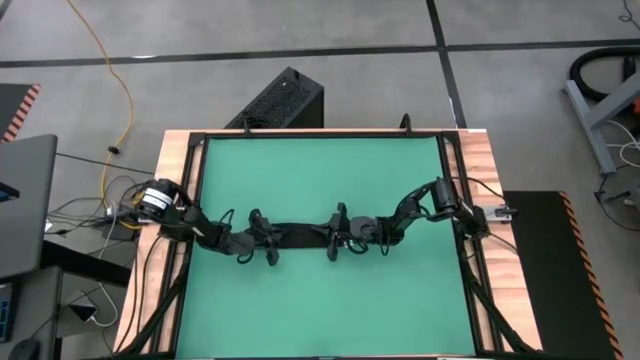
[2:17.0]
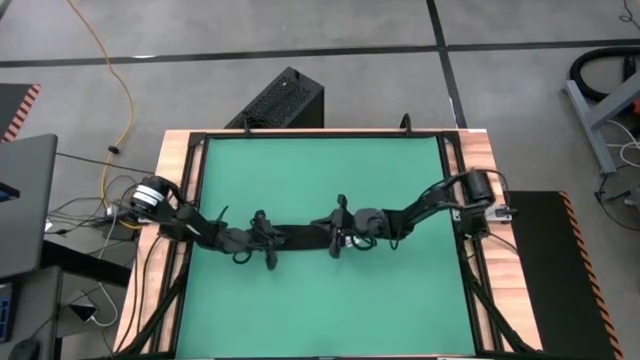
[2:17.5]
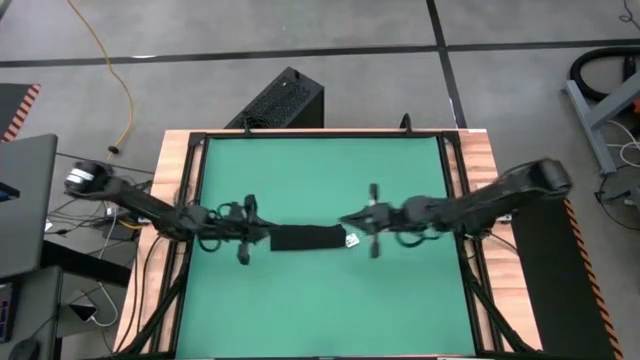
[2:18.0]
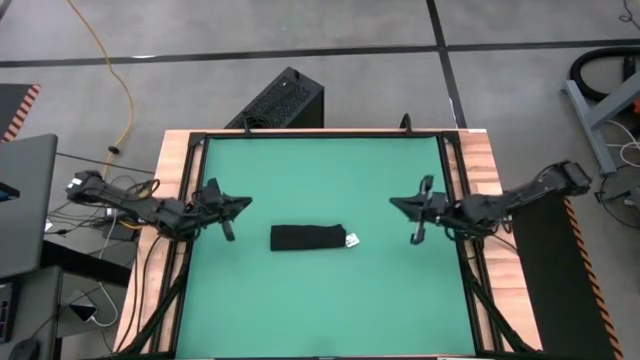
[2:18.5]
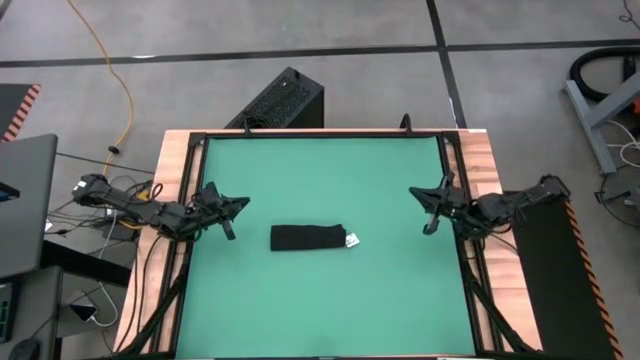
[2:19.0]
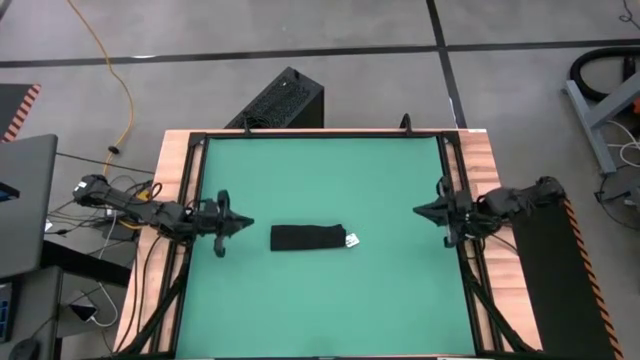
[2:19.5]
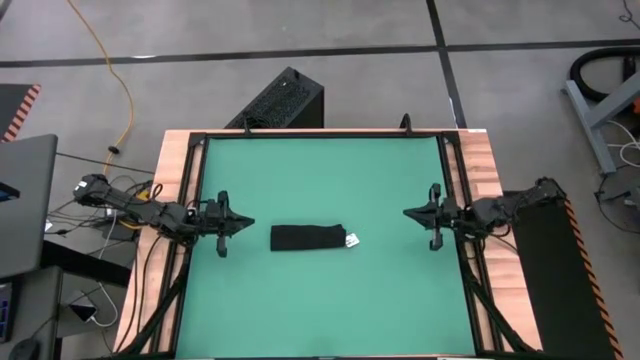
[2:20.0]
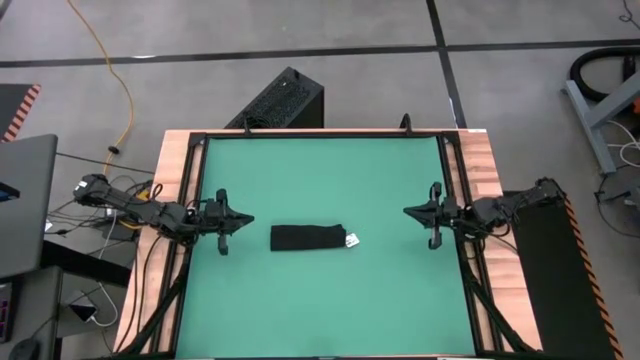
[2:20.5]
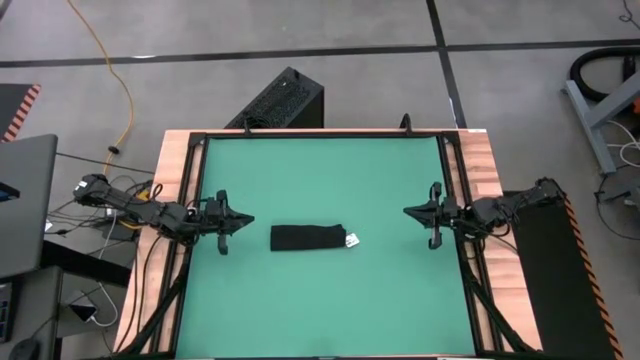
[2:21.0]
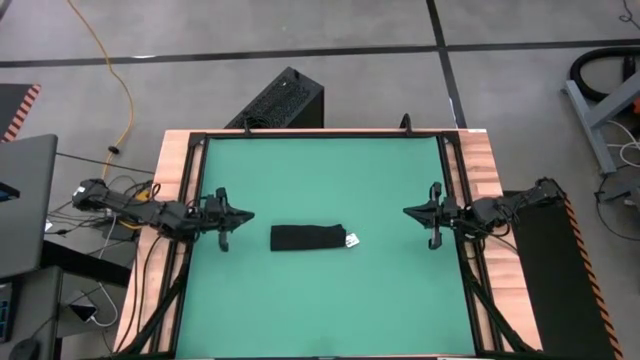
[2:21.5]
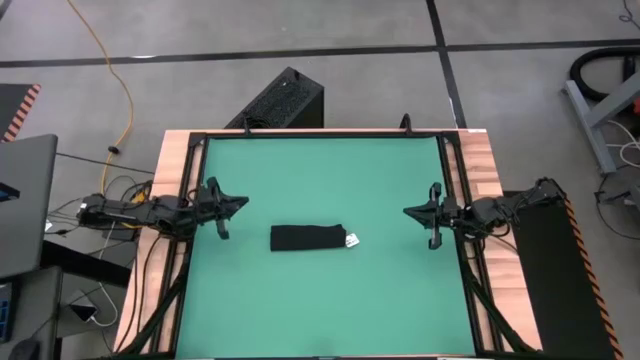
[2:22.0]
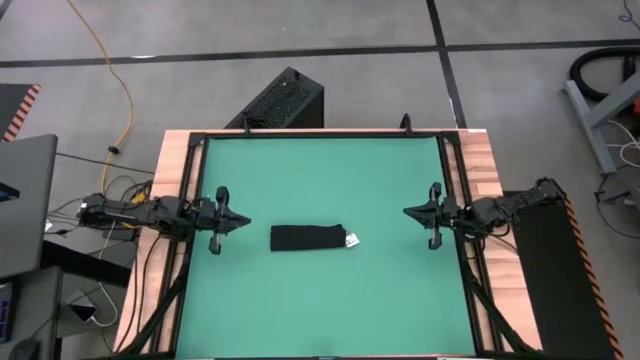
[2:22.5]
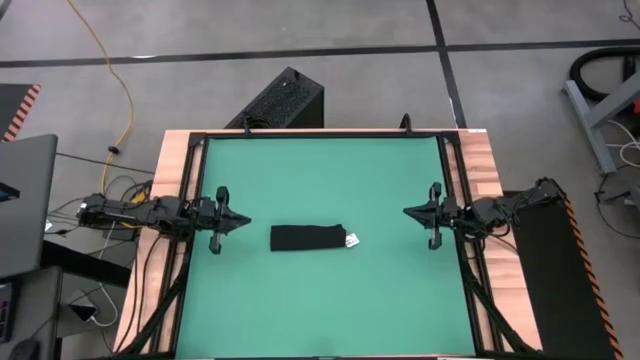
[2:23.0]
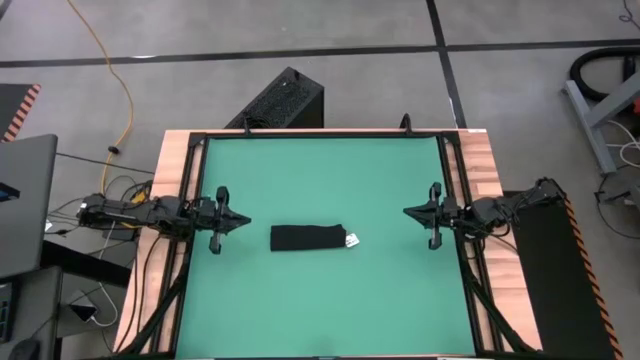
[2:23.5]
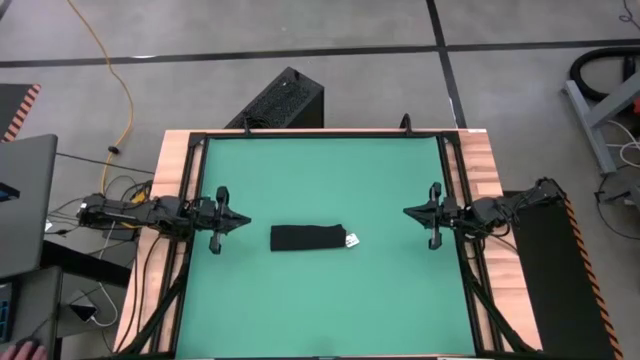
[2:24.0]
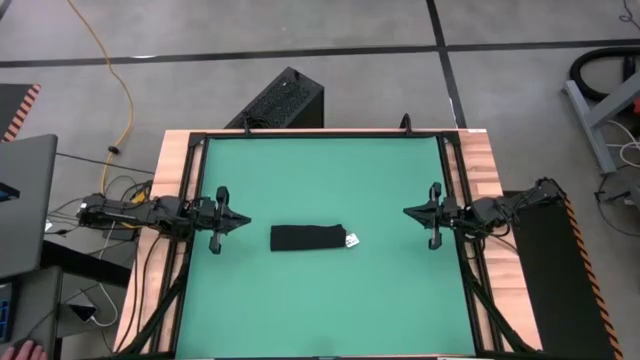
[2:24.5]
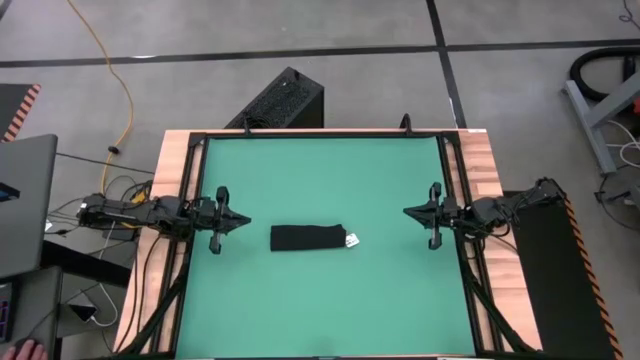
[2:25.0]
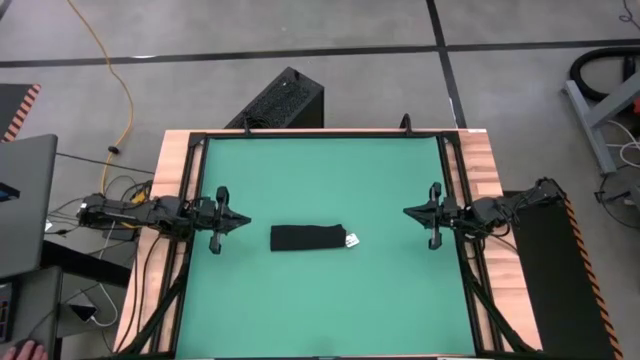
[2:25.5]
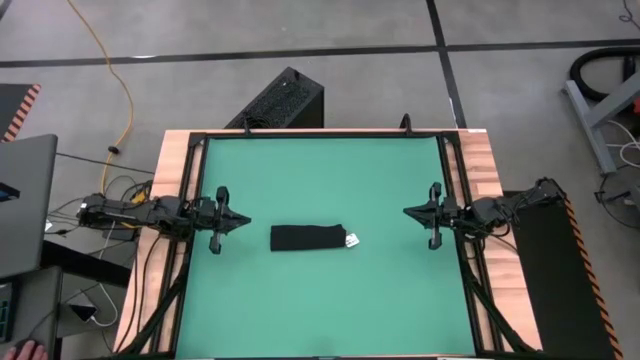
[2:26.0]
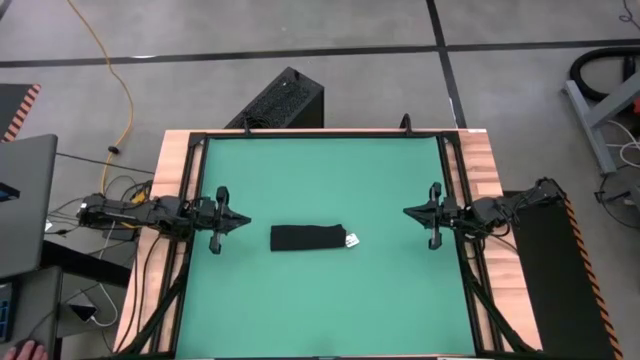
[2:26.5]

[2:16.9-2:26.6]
Task: Roll towel
Return to Home Position

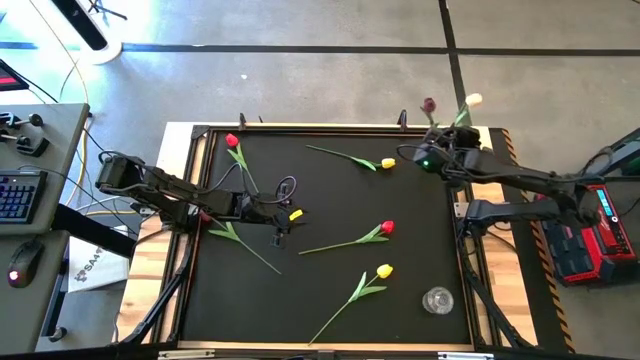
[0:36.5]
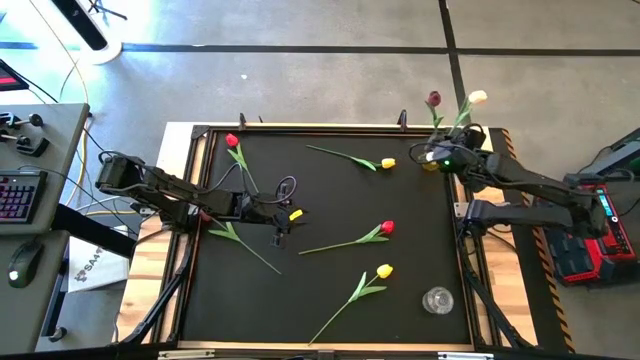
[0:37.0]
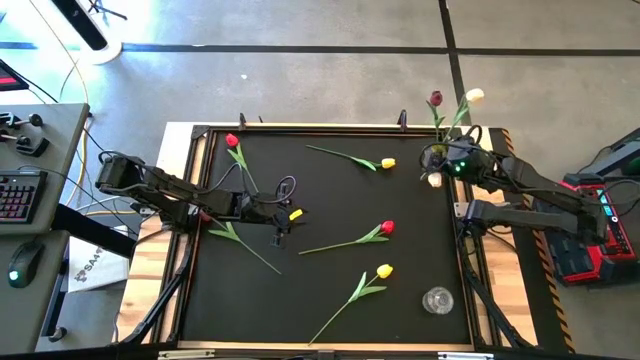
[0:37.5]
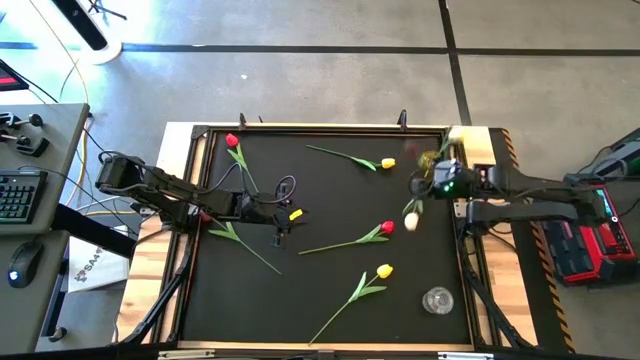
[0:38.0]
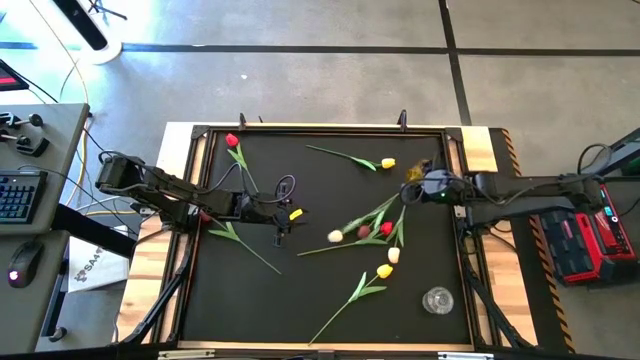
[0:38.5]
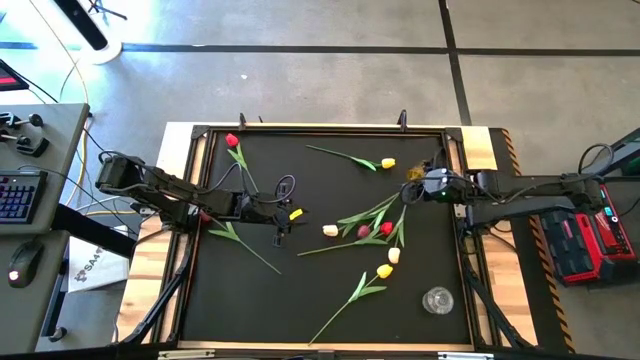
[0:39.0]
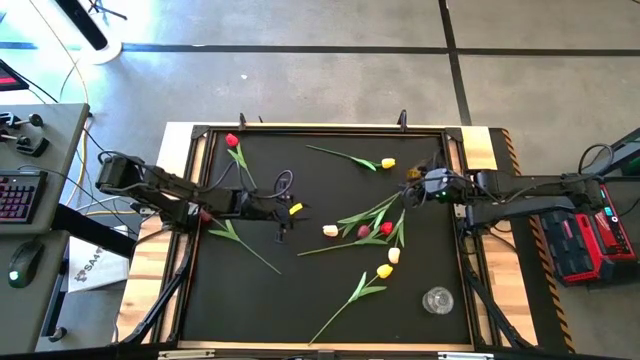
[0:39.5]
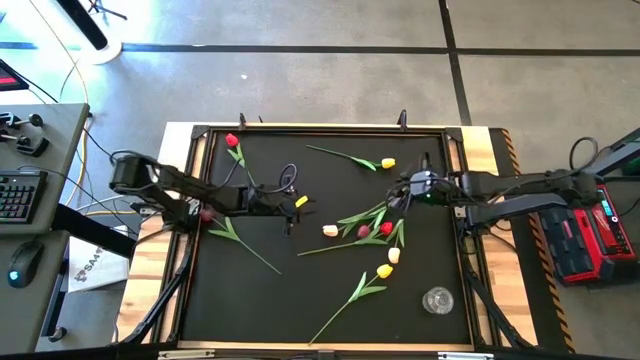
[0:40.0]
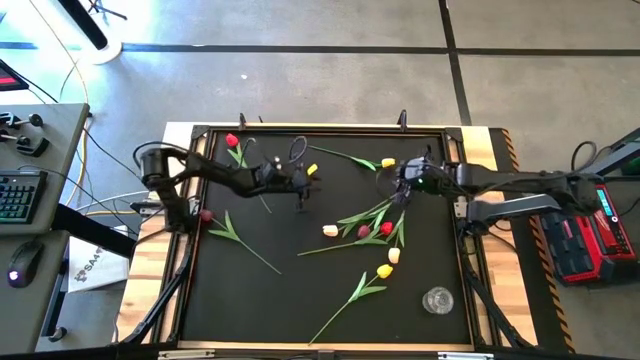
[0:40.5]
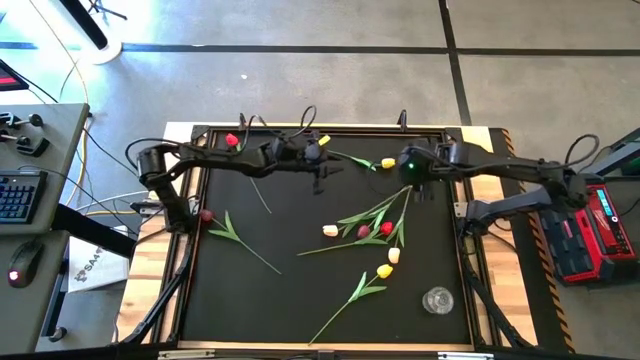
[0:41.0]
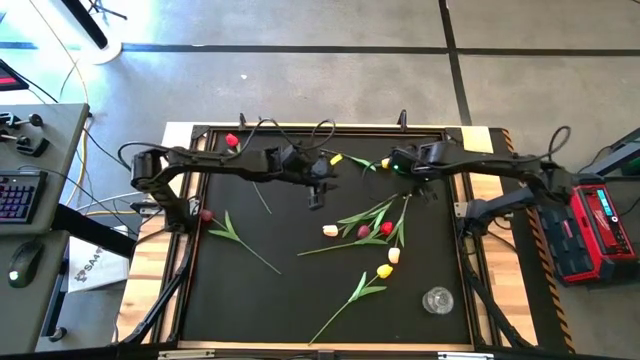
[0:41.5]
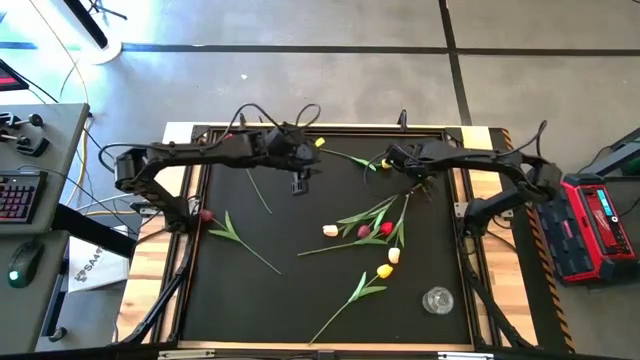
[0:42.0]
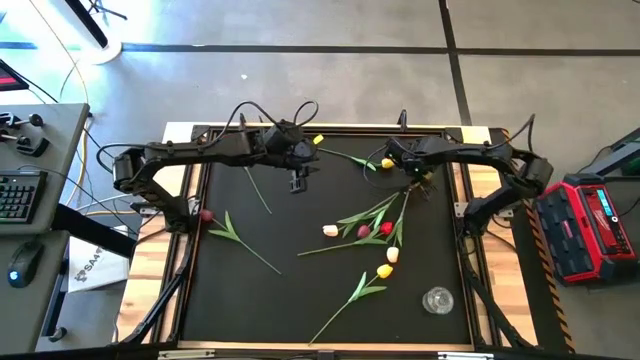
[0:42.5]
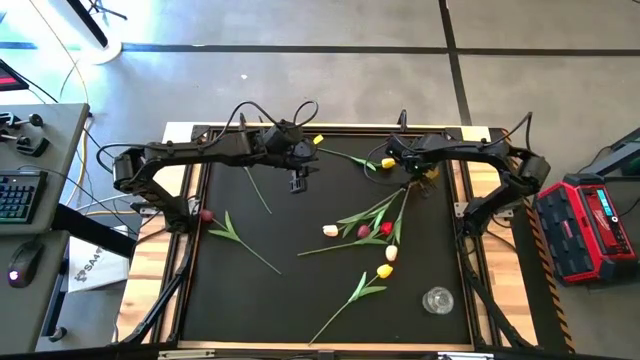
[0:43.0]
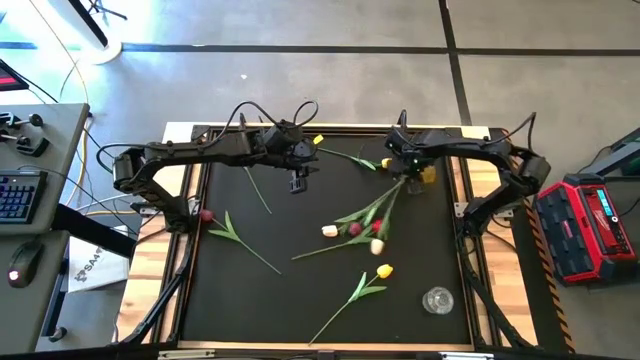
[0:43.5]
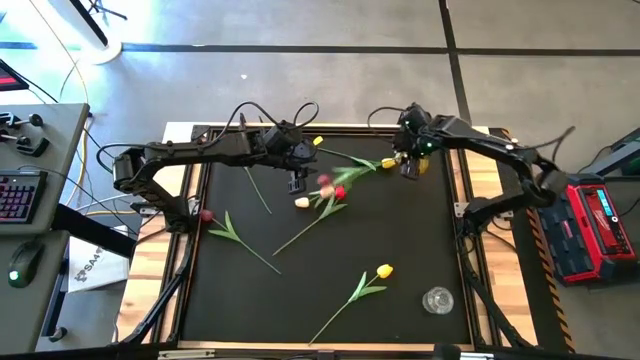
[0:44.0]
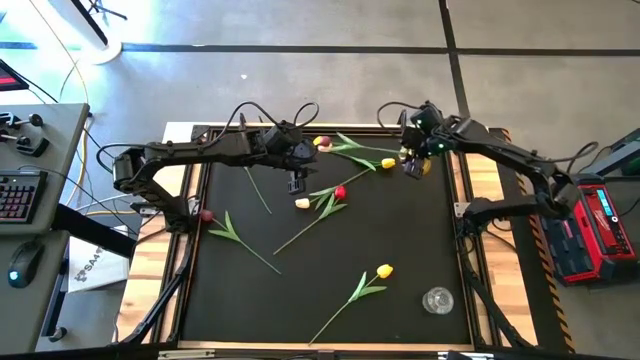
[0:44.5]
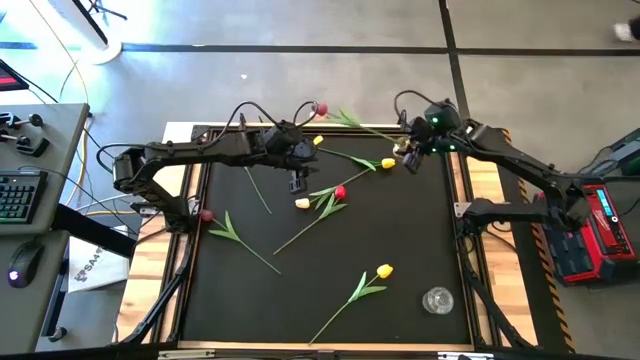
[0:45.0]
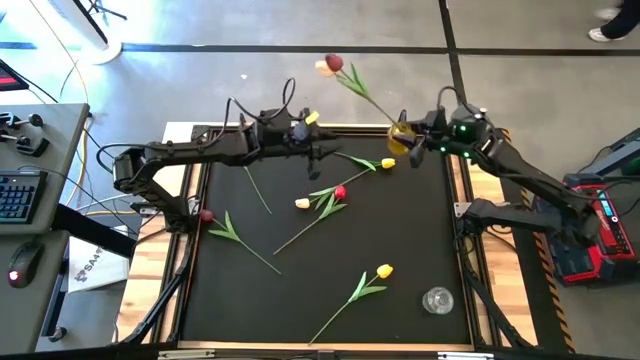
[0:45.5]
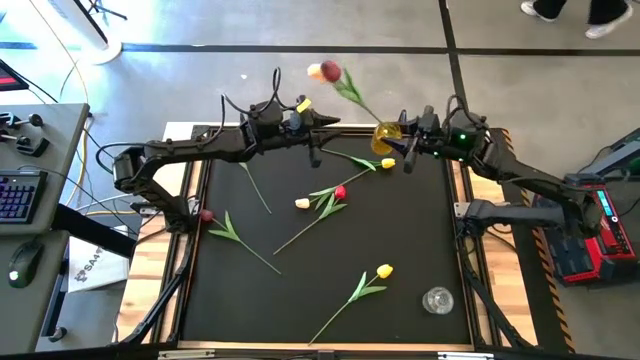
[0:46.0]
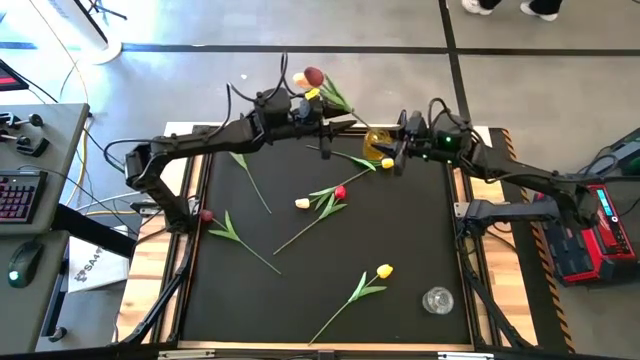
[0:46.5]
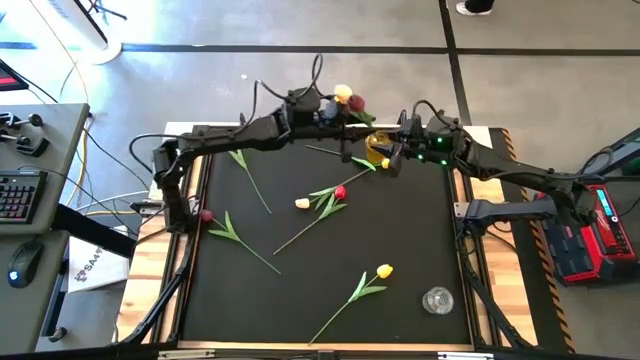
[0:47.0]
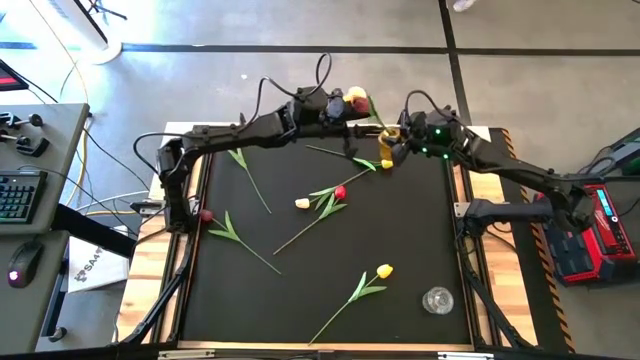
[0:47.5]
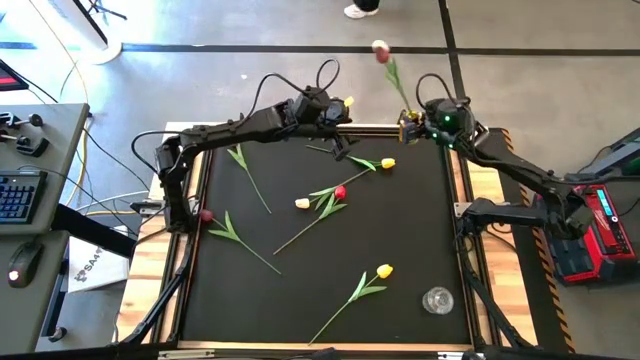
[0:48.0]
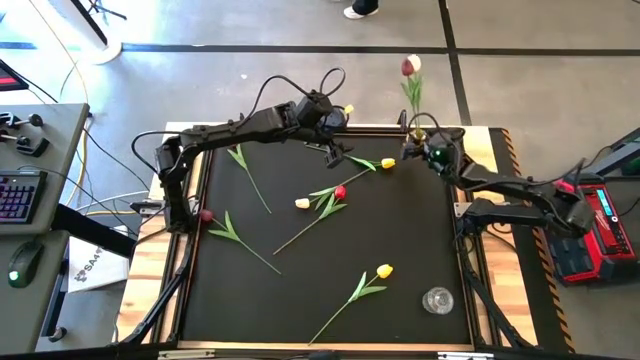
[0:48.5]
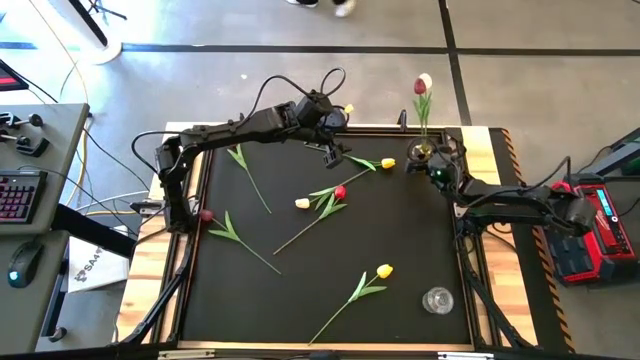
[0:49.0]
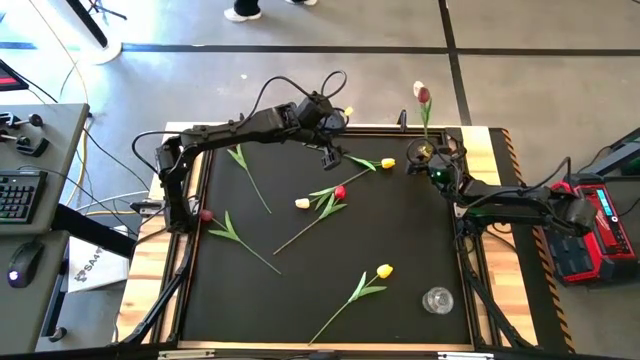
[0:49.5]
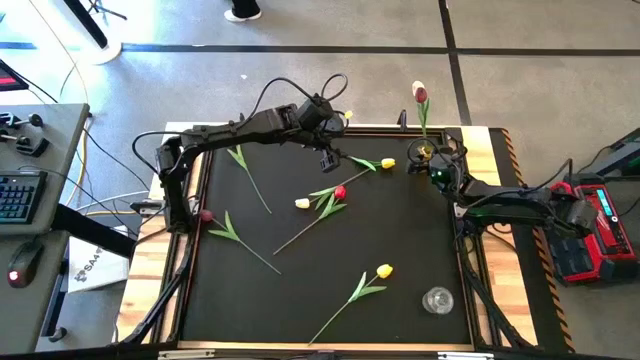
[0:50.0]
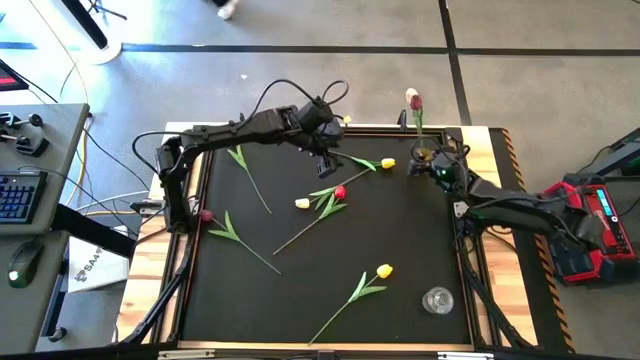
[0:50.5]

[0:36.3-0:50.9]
Task: Sort flowers into vase by color
Adjust the yellow flower vase
